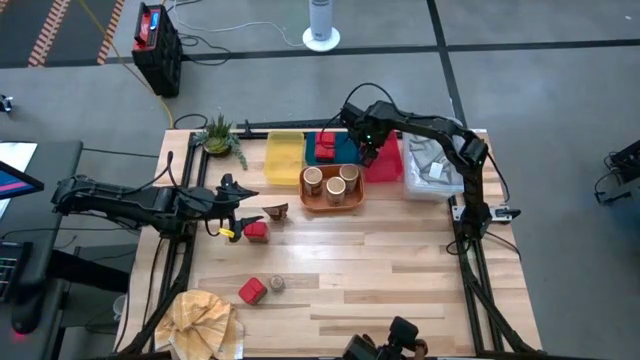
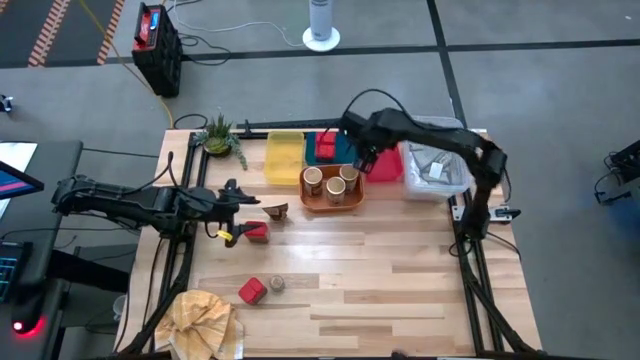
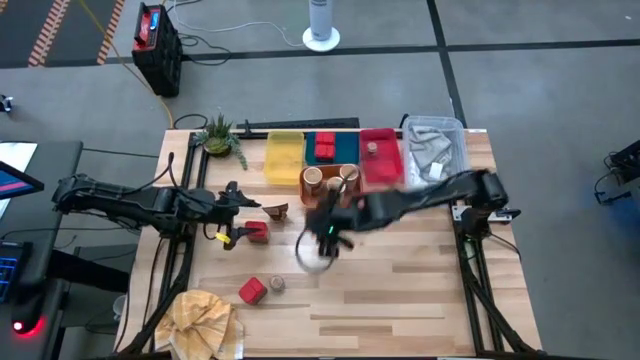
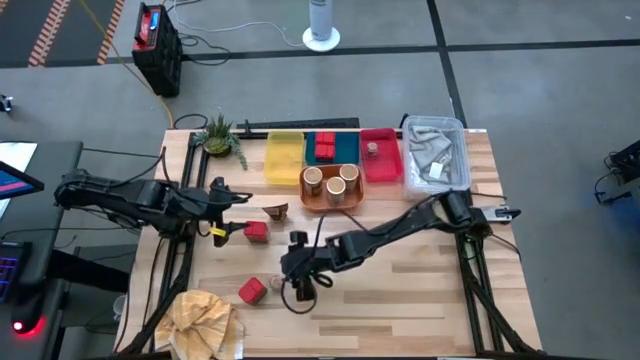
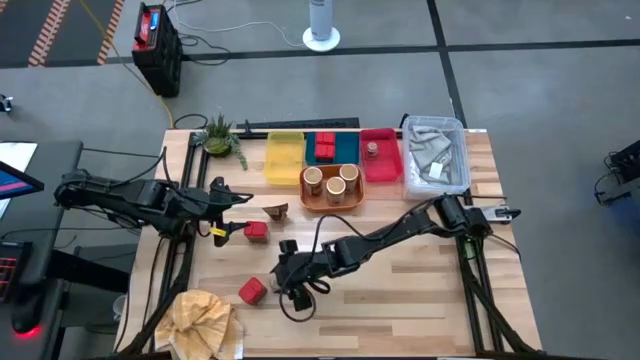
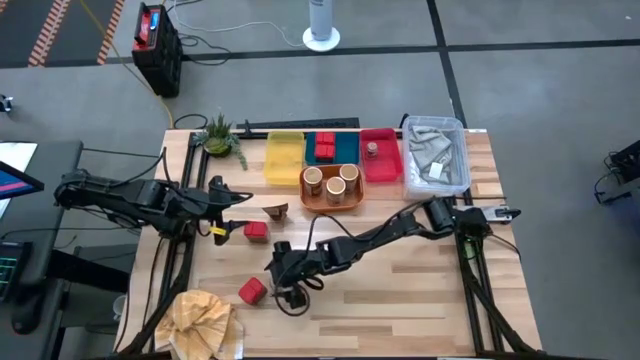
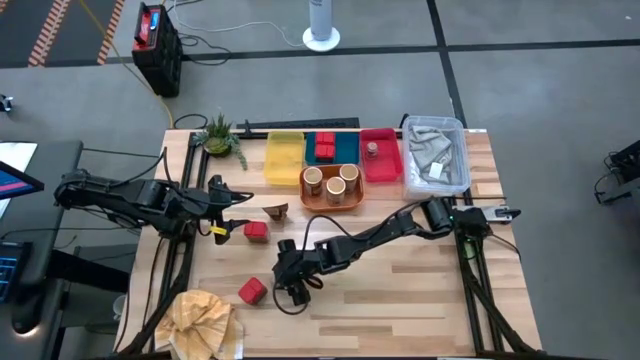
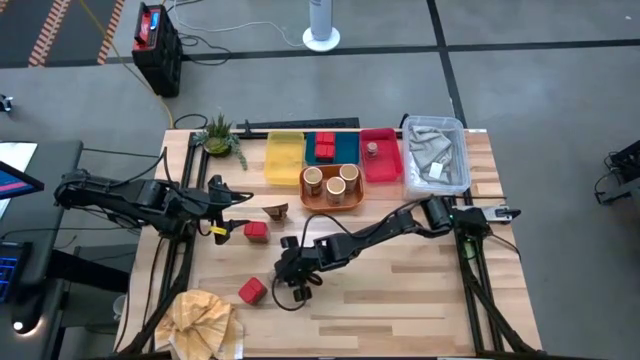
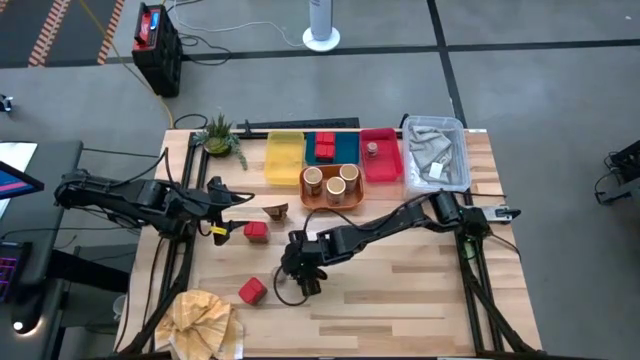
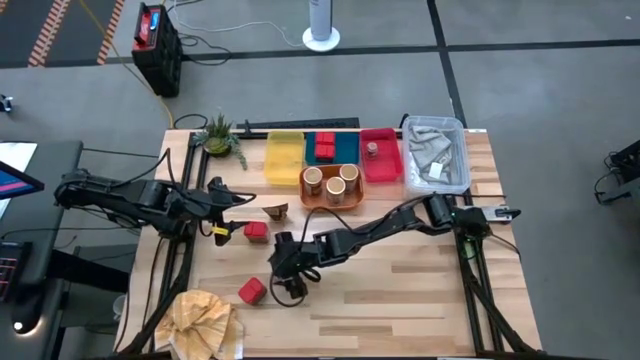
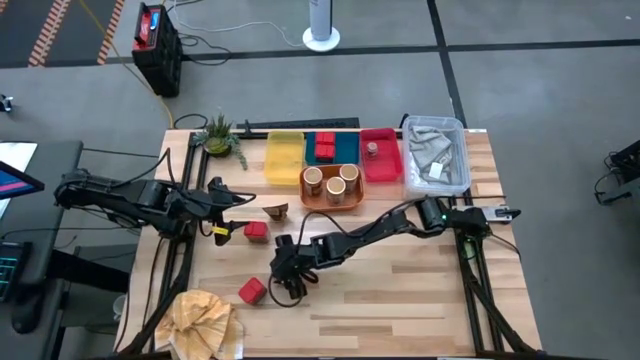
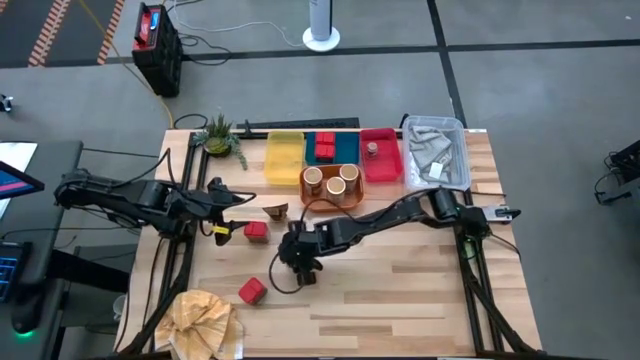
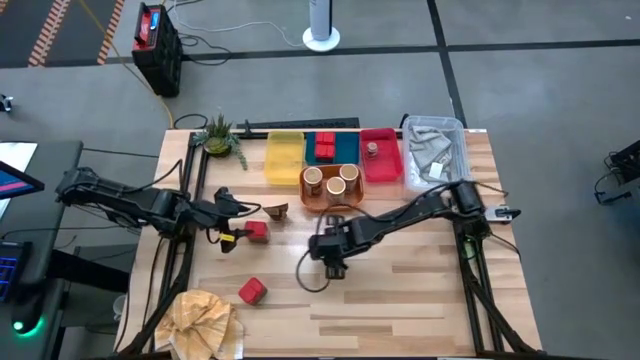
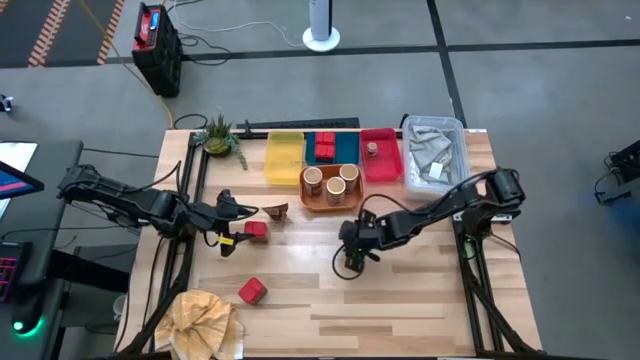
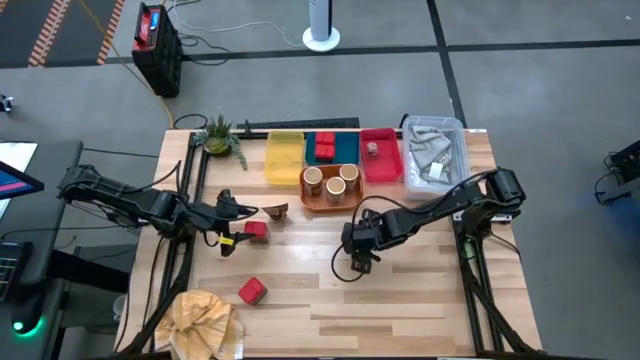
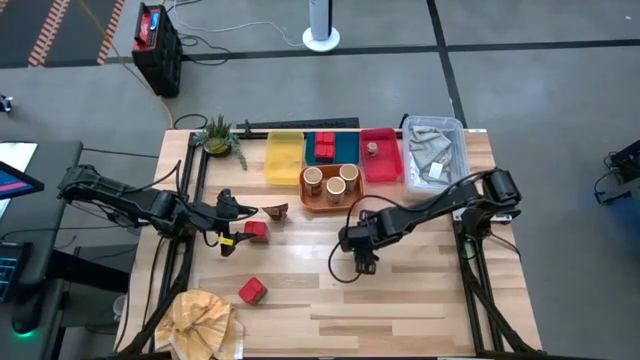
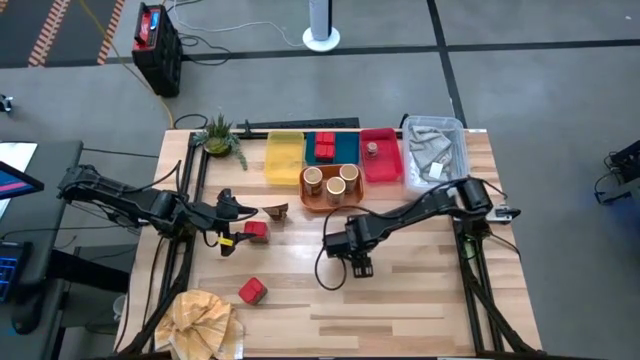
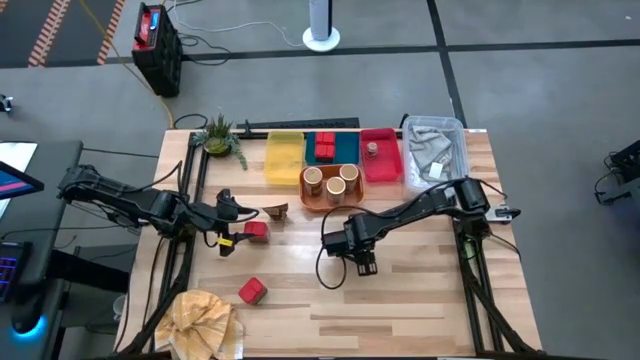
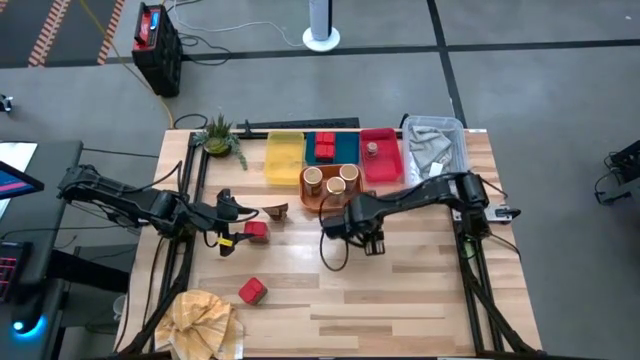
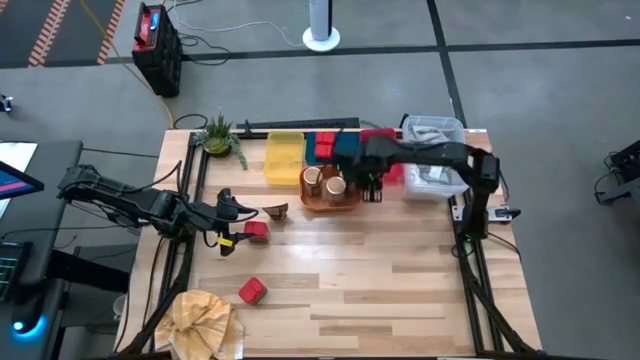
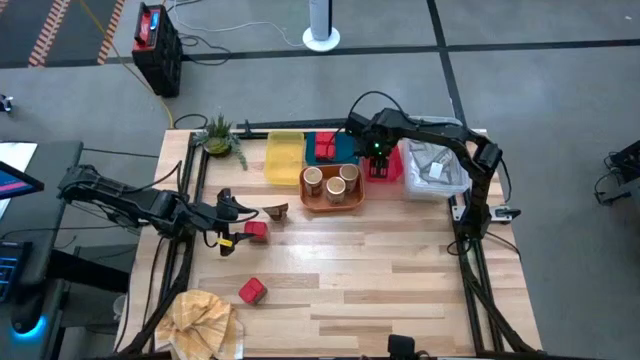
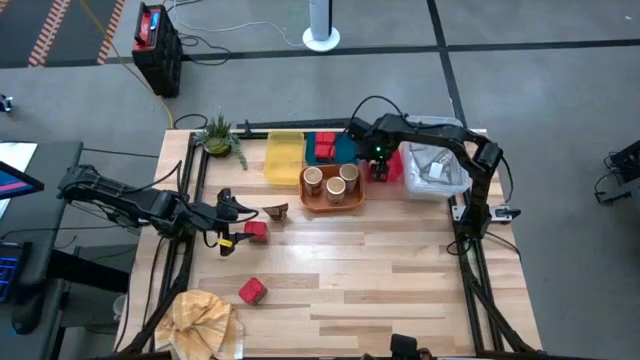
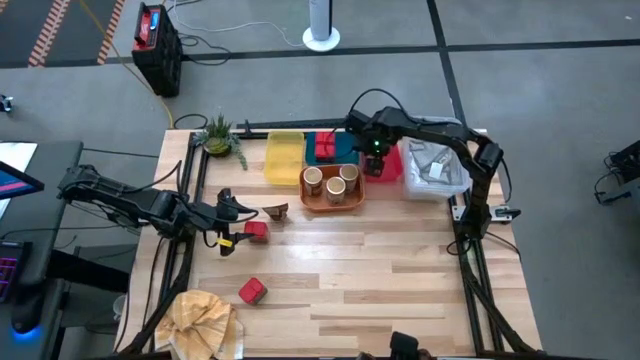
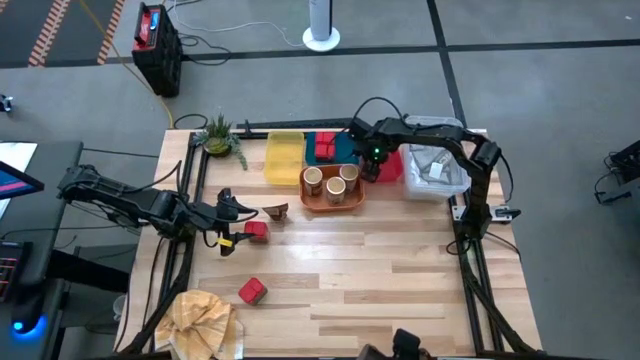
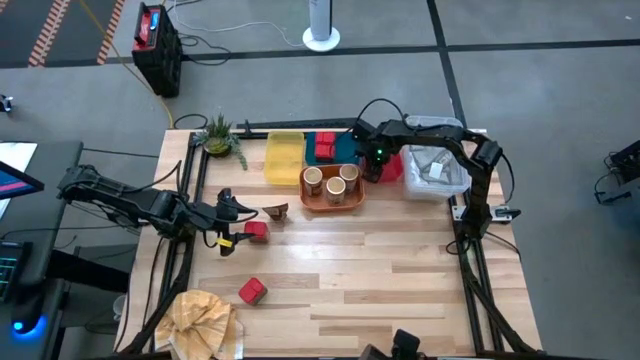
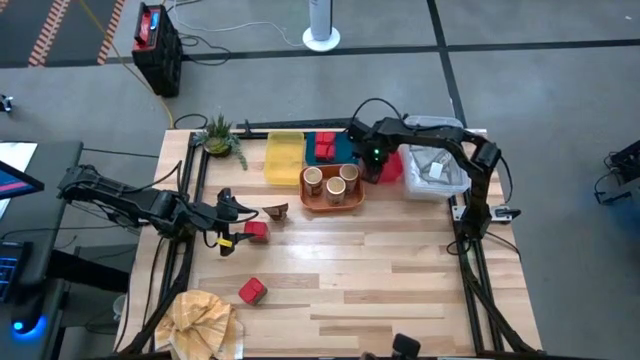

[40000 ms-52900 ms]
Task: Sort spices by type
Put the brown seasoning bottle into the red bin
